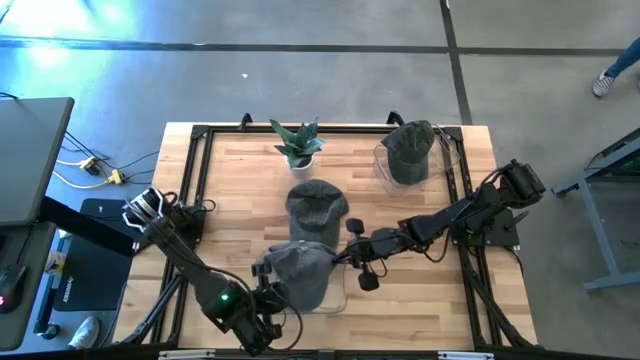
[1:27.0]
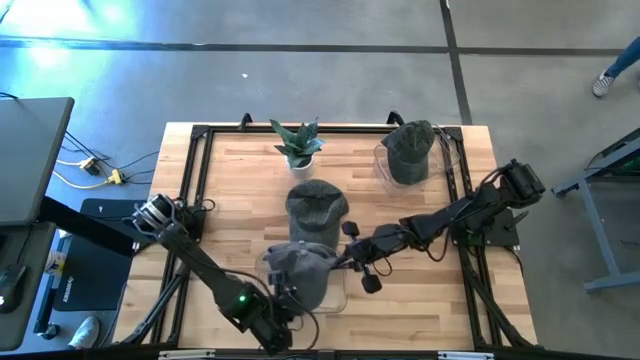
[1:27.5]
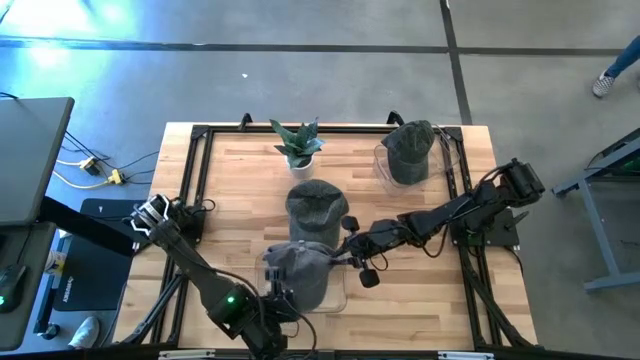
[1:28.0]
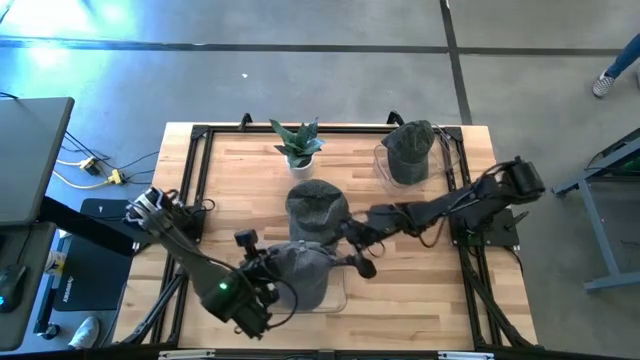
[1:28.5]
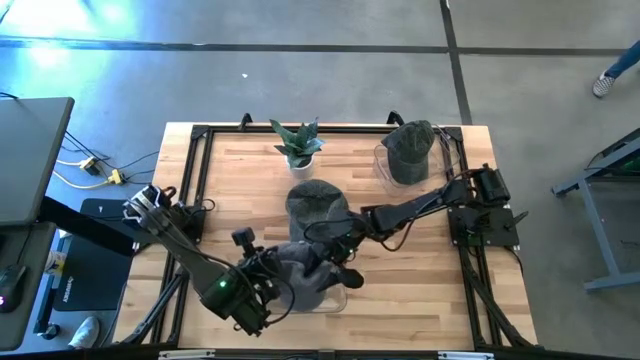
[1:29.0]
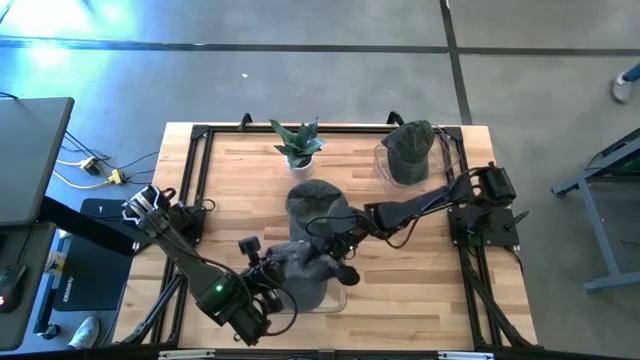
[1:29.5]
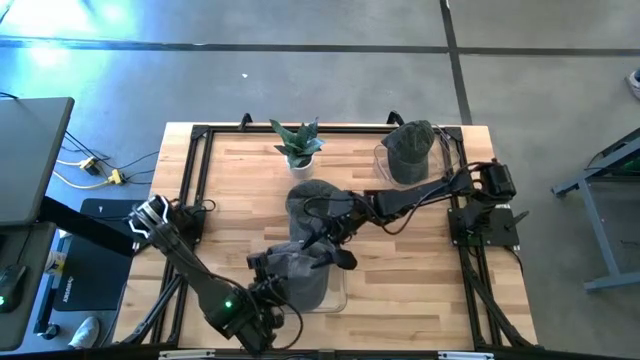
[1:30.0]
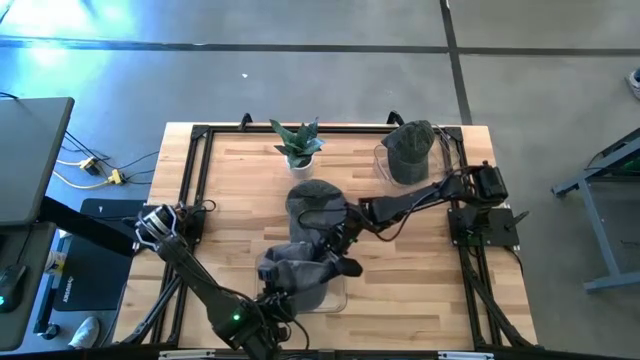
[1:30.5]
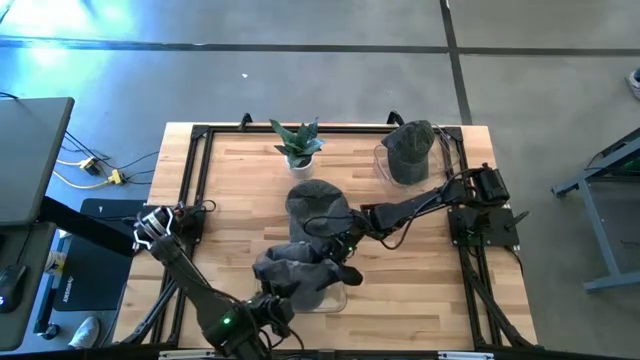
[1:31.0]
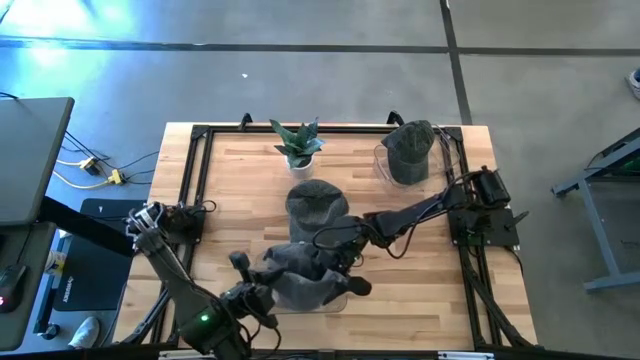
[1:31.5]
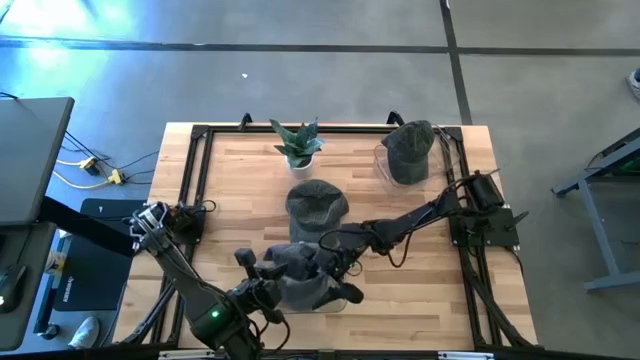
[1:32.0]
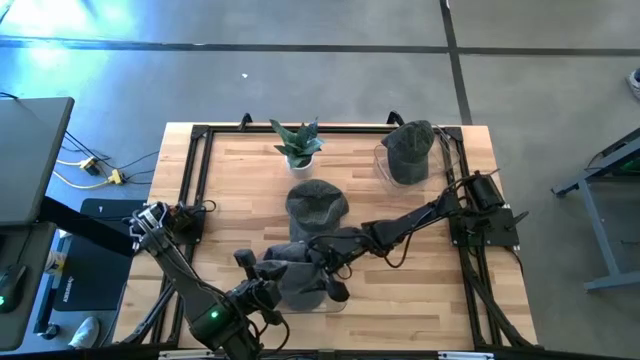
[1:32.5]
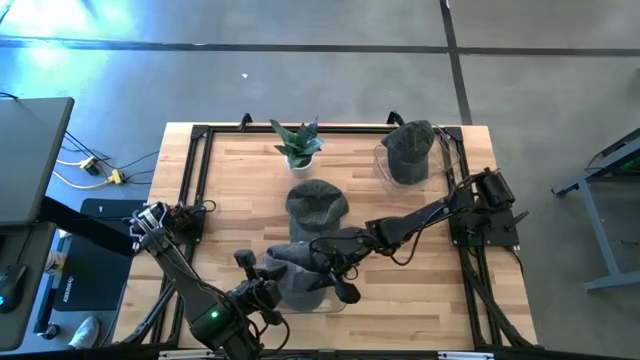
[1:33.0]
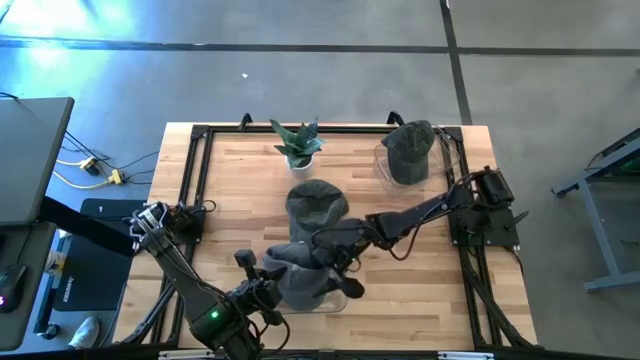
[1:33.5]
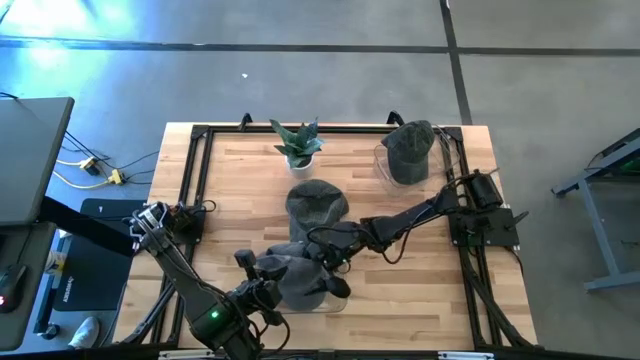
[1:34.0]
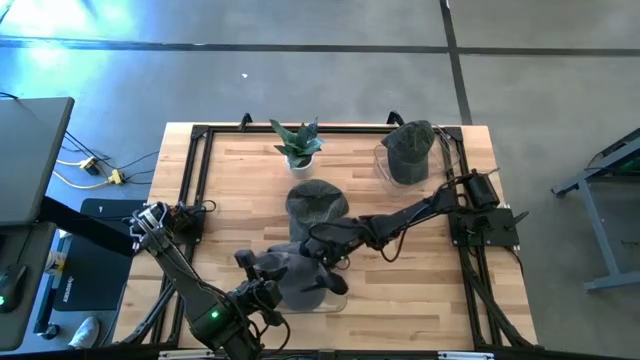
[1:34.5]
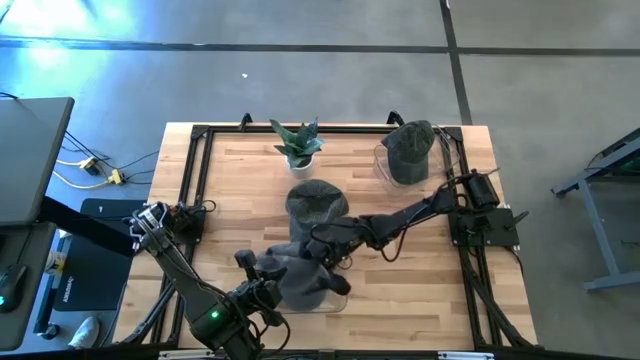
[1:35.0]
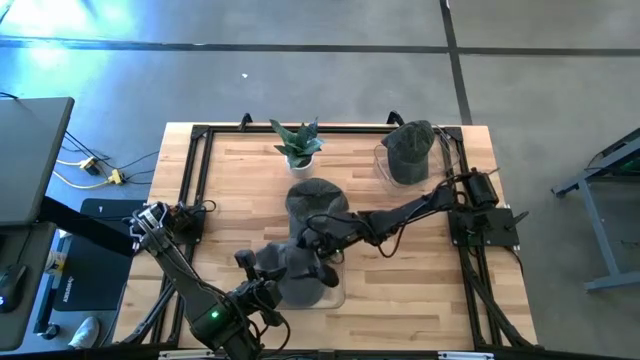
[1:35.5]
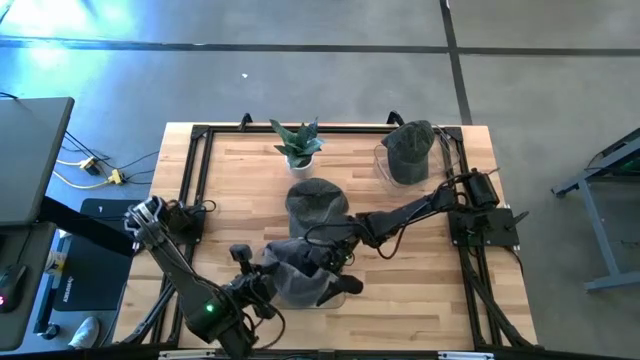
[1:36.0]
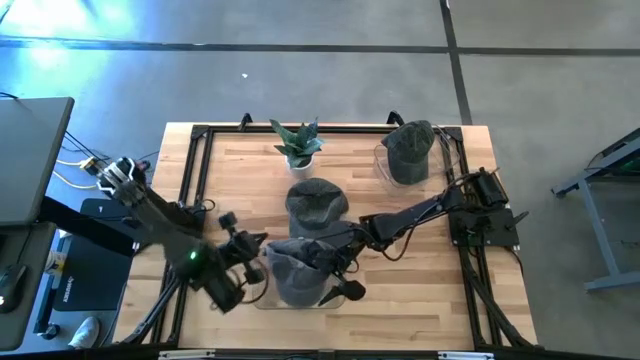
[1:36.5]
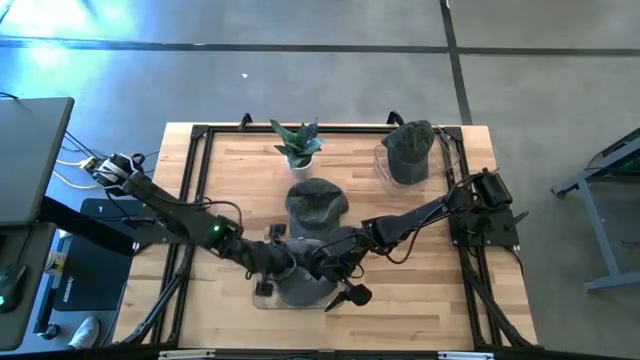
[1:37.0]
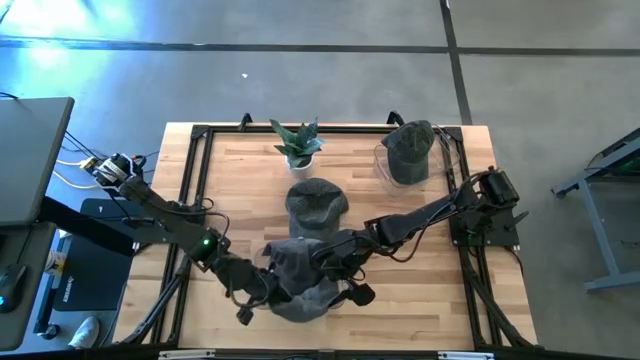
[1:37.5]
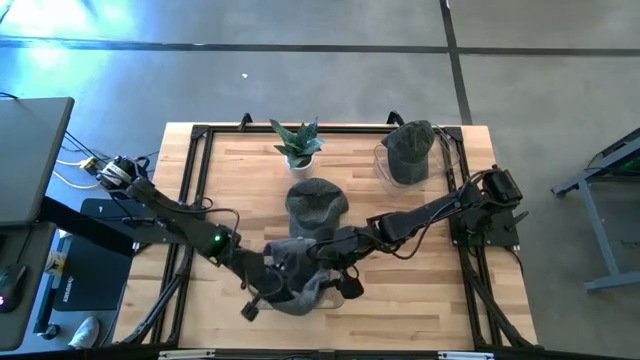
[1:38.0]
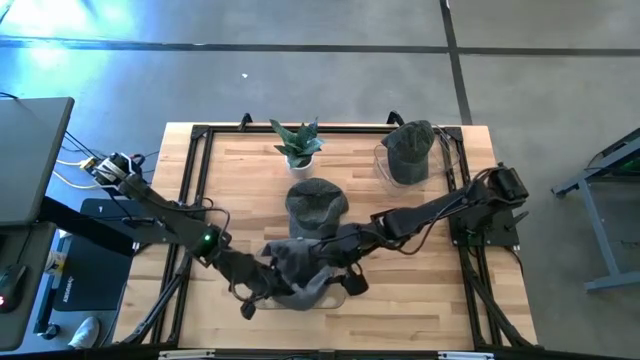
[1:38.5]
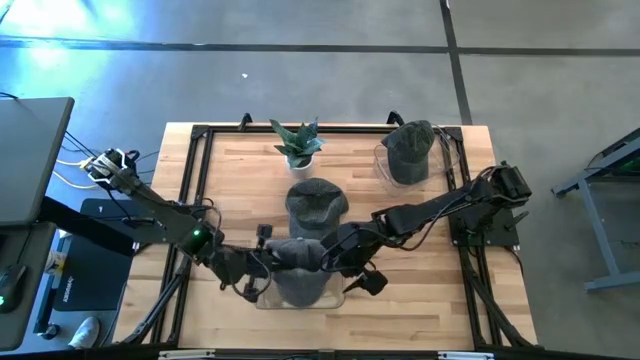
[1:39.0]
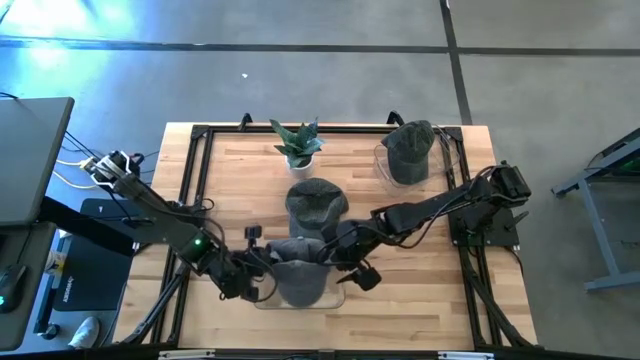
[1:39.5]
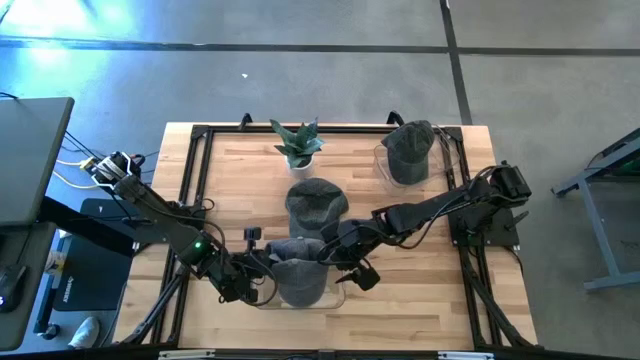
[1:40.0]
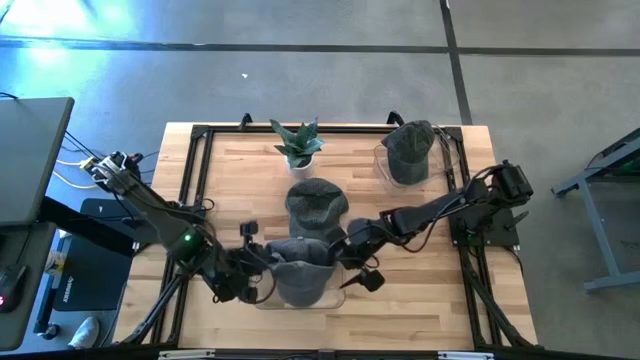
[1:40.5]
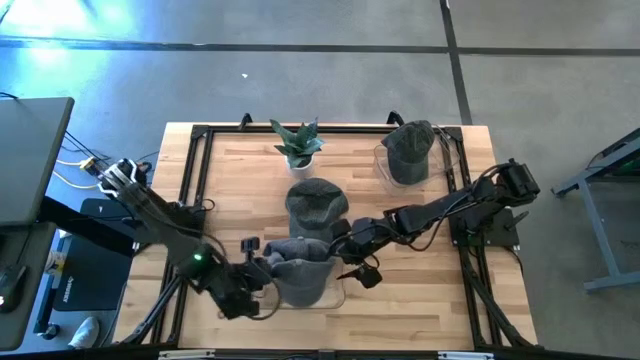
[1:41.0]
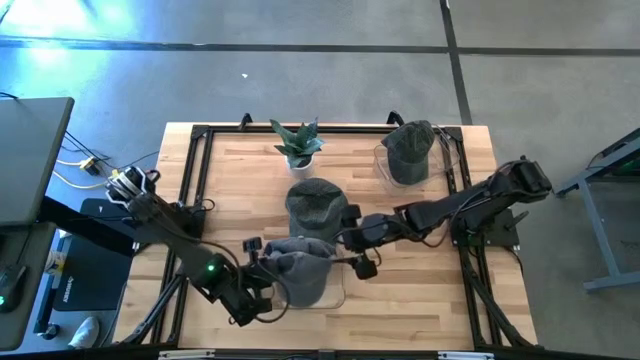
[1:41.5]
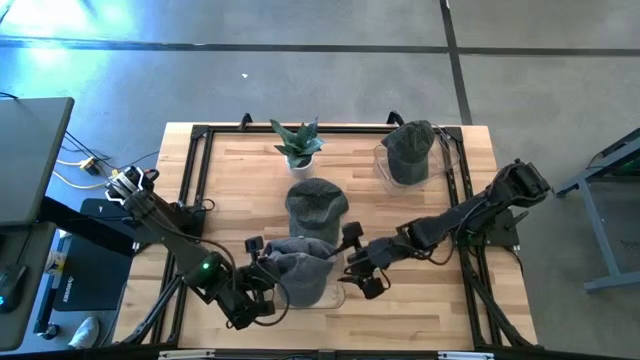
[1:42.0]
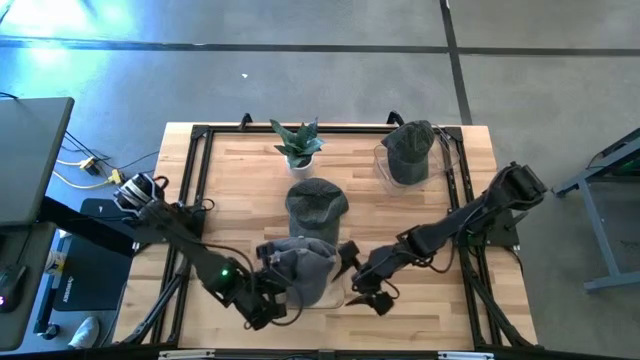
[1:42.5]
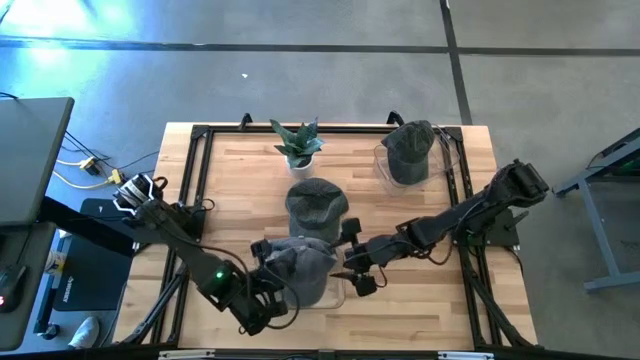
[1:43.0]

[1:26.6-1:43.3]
Task: Pick & Place hat
Put the gray cap into the bottom transparent bin

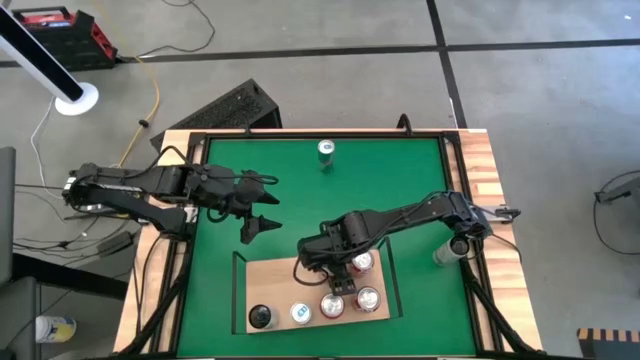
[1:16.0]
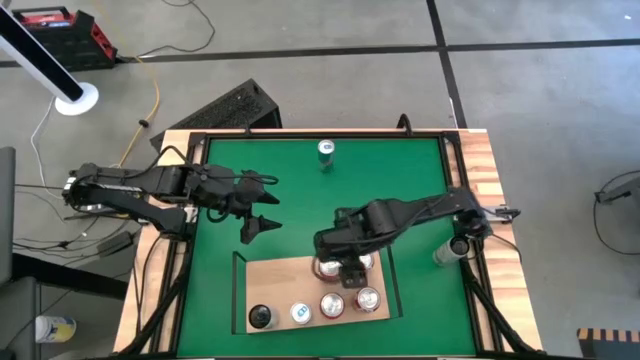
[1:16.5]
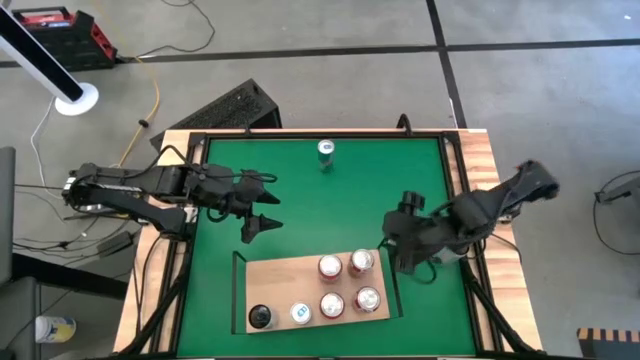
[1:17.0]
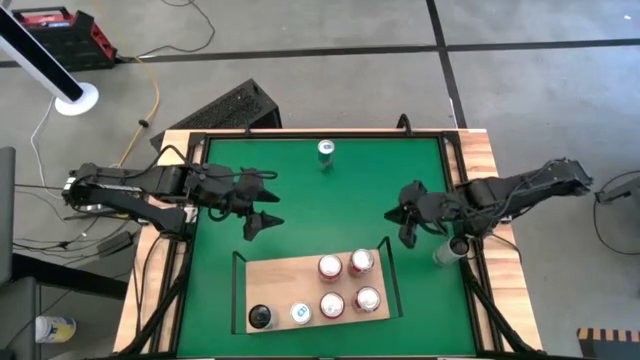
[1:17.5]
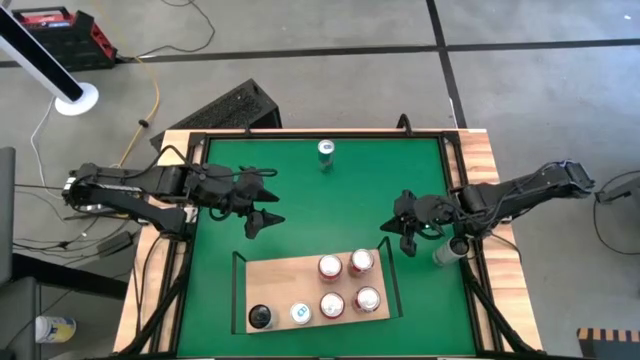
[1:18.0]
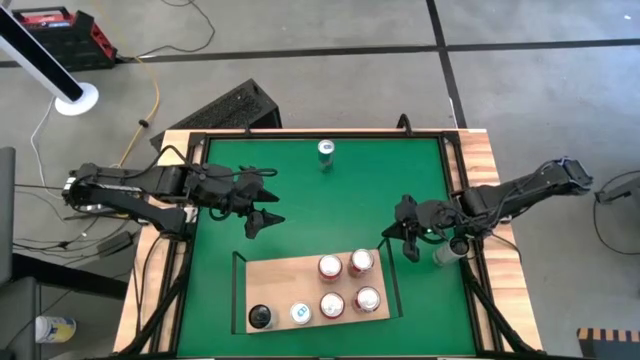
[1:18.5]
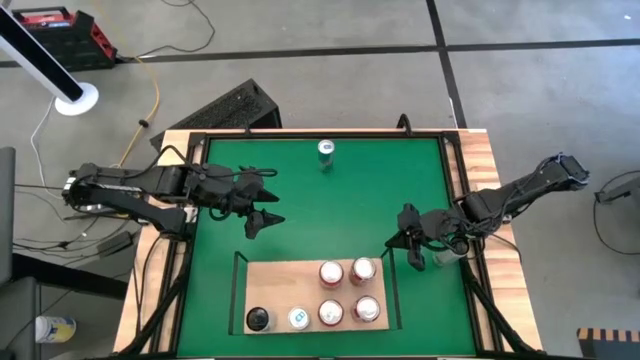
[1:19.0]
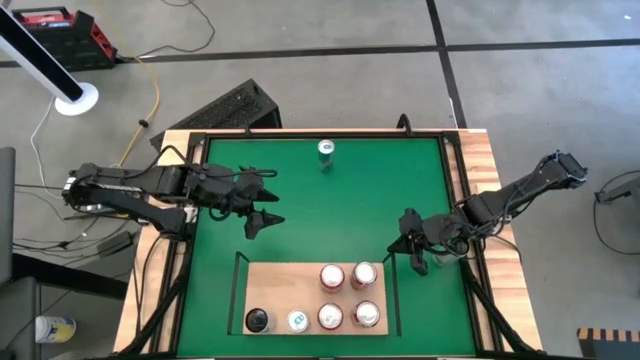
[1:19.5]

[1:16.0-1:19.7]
Task: Place canned beverage on shelf
Adjust the shelf
